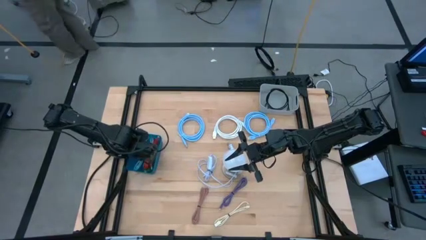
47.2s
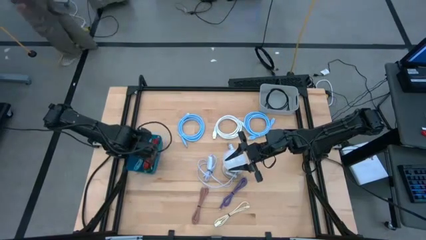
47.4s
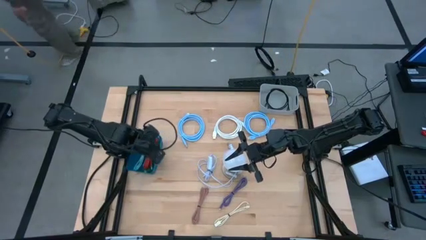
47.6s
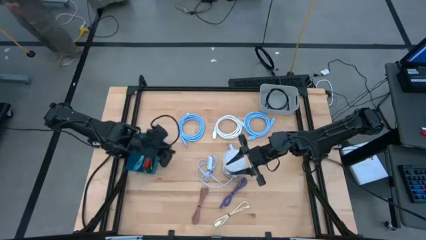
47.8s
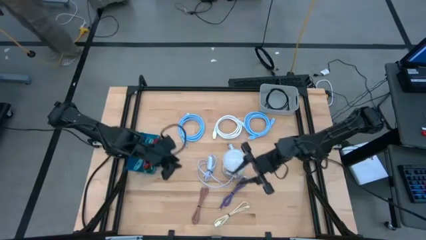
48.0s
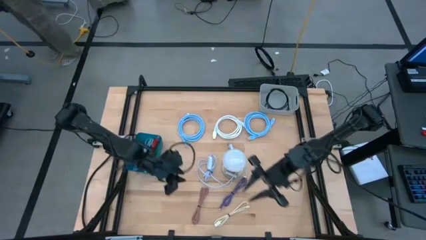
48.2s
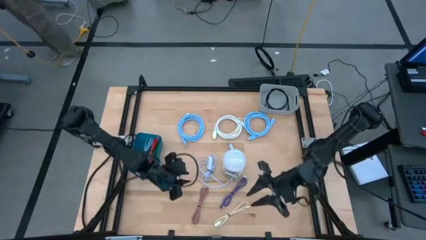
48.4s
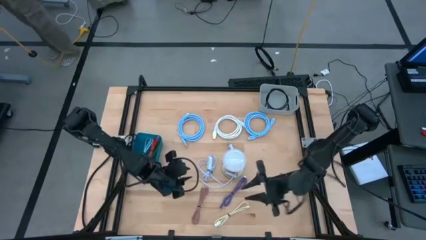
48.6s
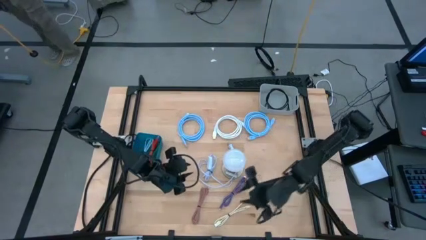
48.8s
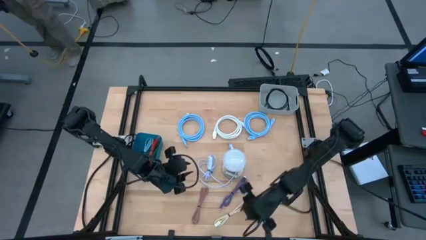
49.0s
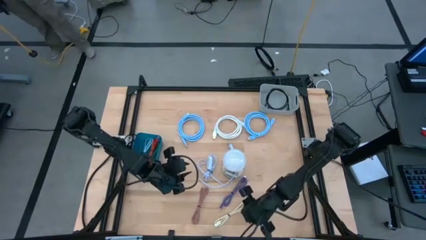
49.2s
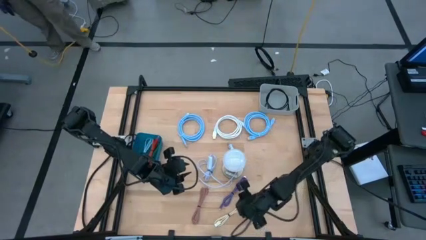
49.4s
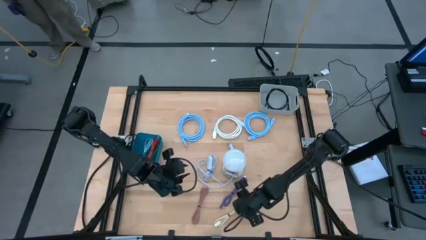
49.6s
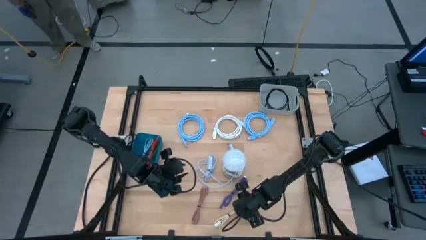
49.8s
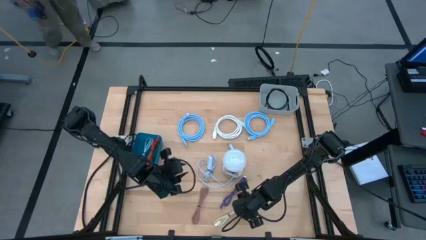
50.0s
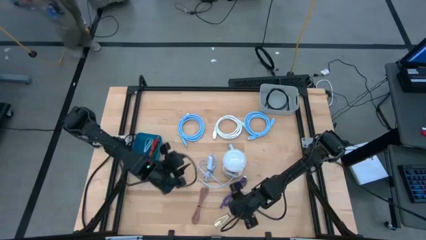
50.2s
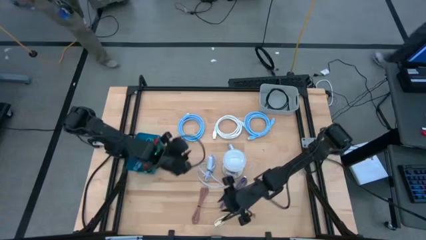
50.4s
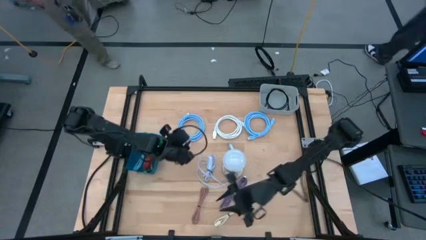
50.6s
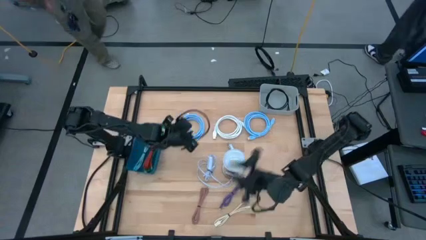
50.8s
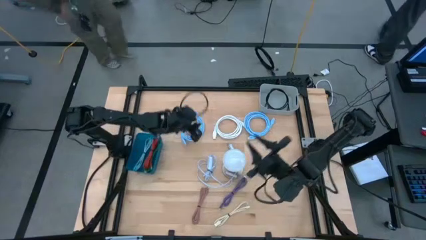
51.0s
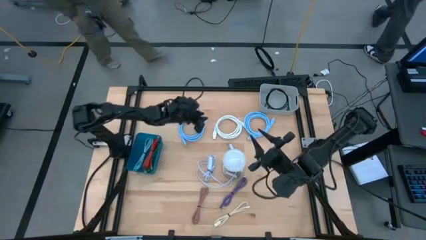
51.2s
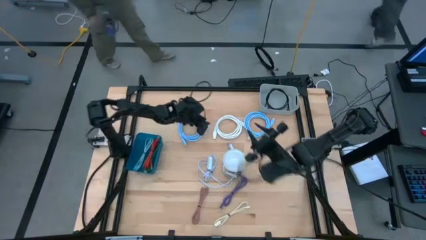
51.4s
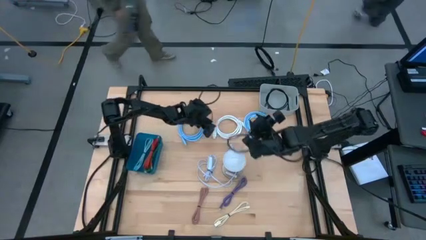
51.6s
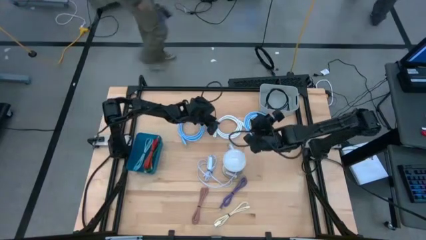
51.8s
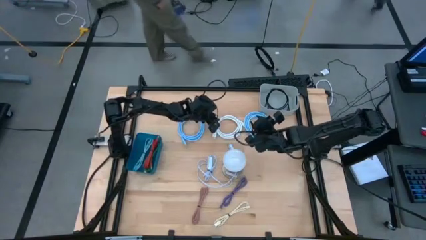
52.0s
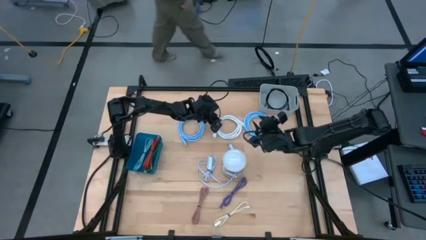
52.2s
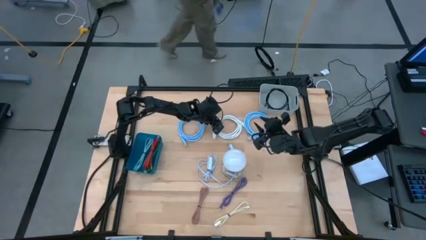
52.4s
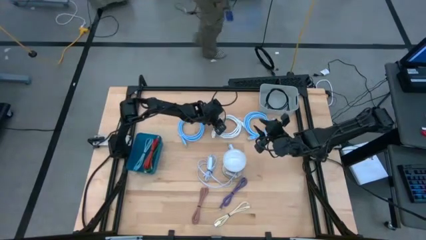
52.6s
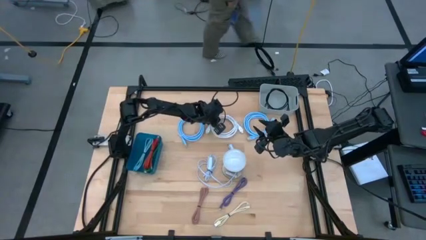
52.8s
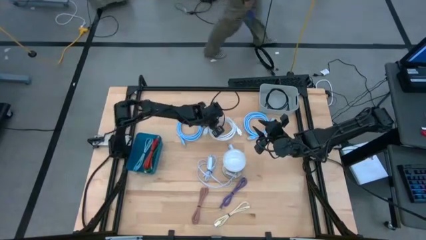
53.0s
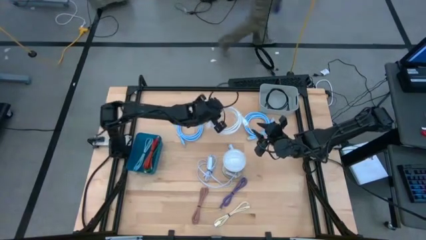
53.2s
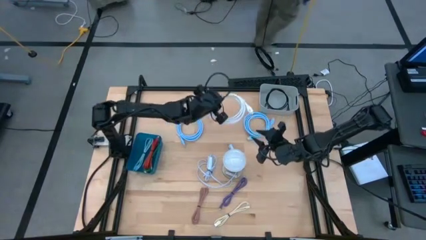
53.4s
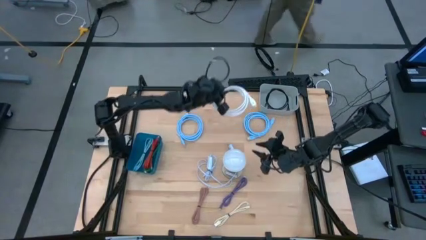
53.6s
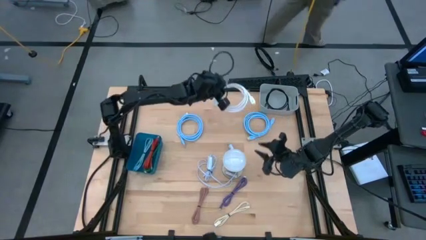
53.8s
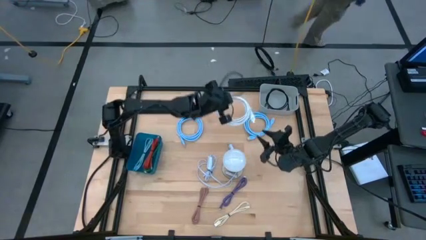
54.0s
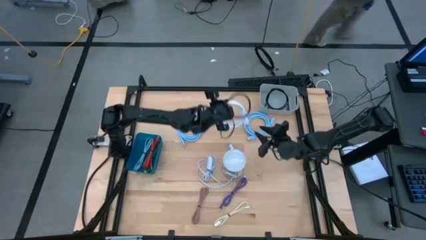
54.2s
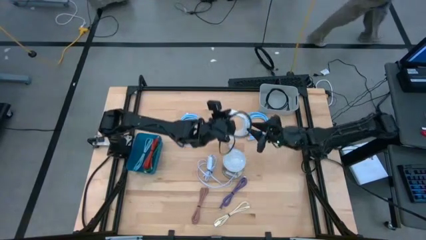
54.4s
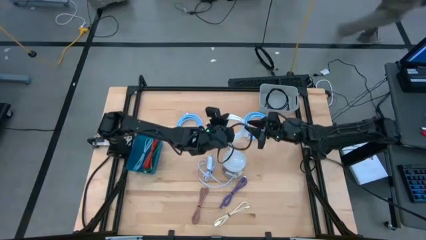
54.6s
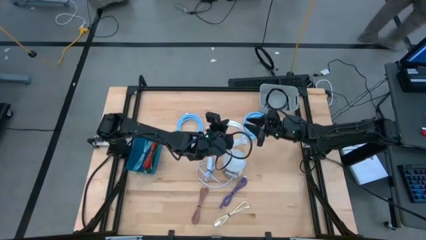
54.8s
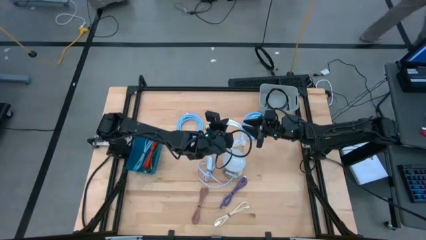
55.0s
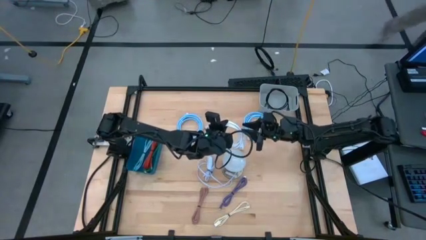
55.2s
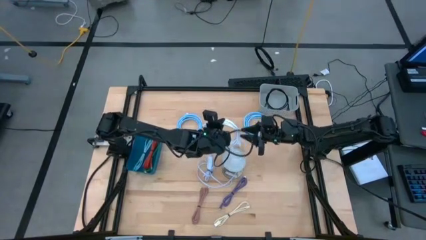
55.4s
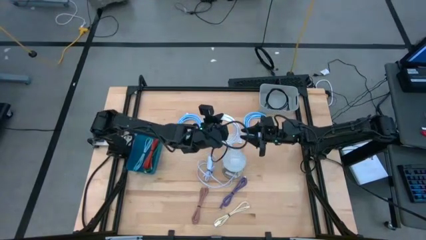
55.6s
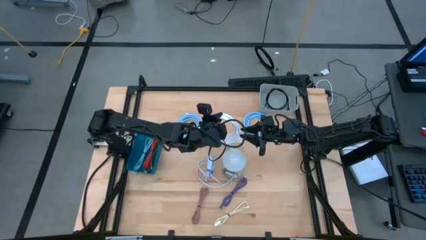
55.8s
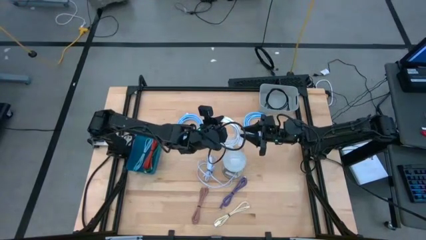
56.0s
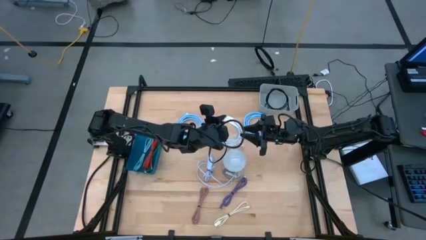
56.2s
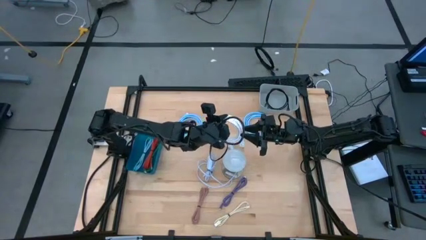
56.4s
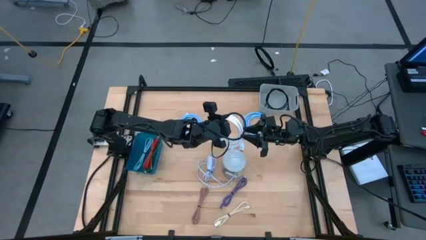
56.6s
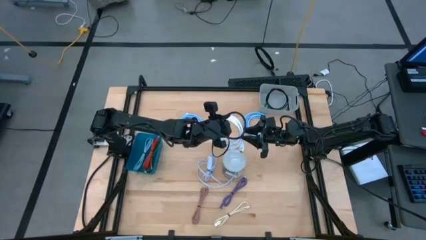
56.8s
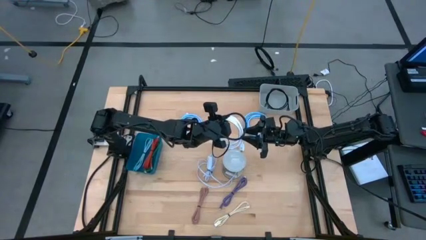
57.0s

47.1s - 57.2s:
Task: Pick & Place USB Port
Put the white HDMI cable into the gray bin

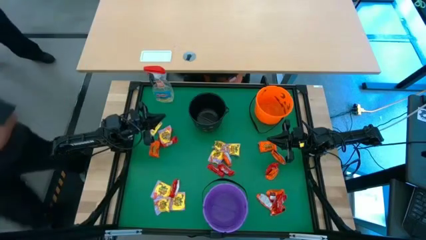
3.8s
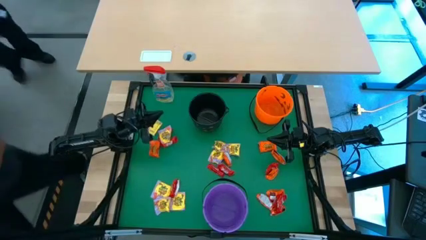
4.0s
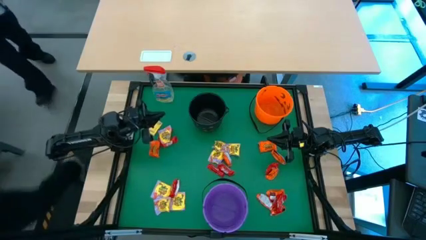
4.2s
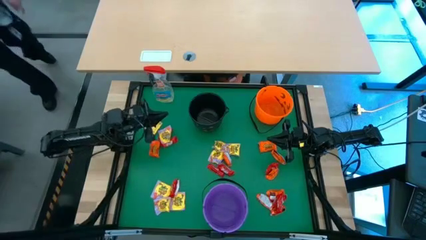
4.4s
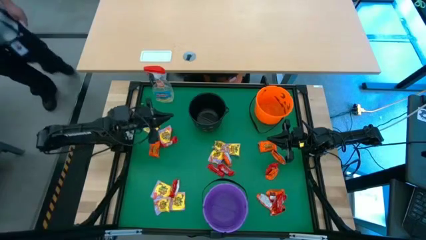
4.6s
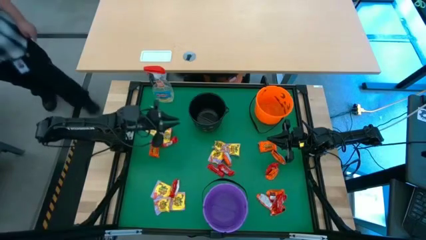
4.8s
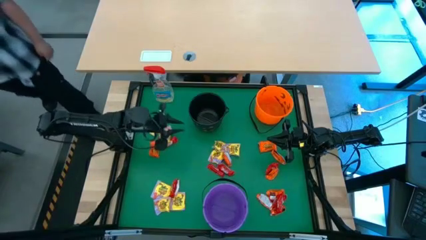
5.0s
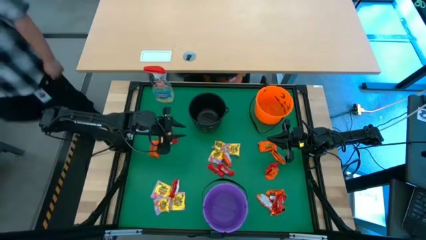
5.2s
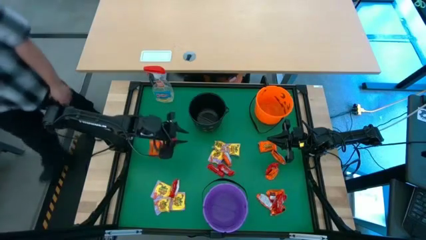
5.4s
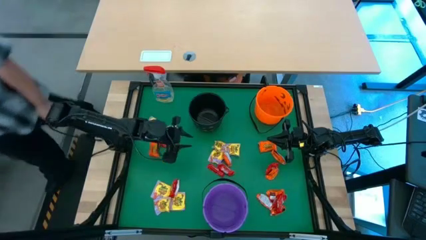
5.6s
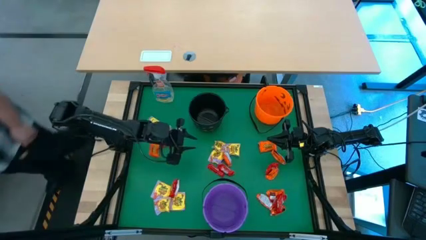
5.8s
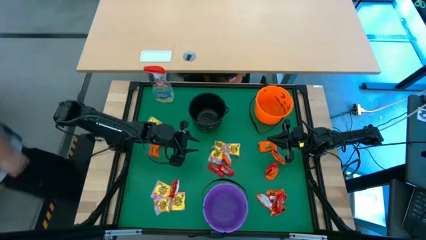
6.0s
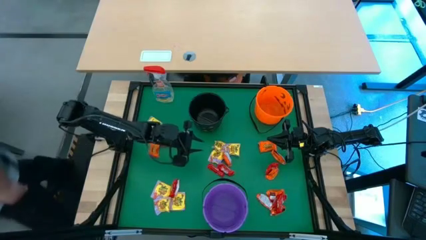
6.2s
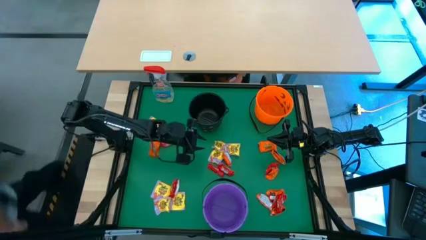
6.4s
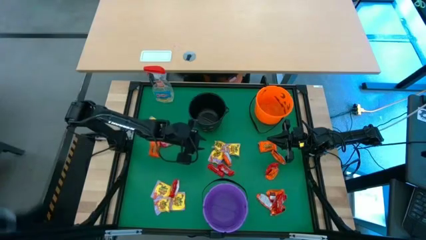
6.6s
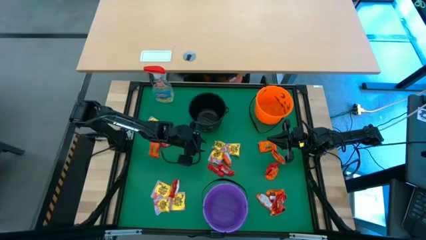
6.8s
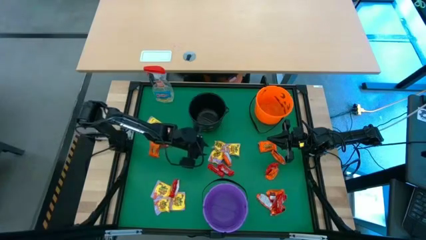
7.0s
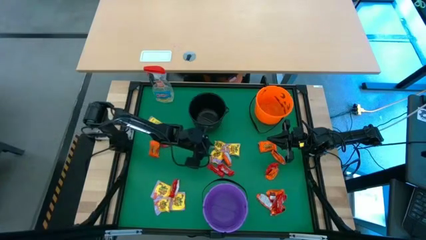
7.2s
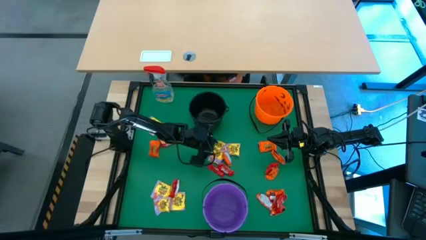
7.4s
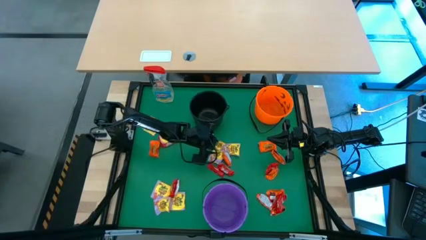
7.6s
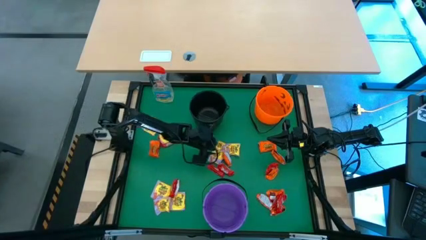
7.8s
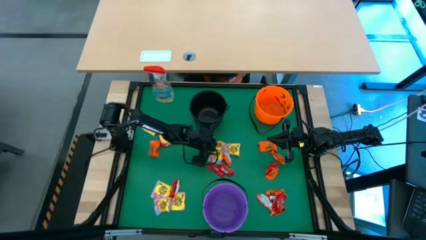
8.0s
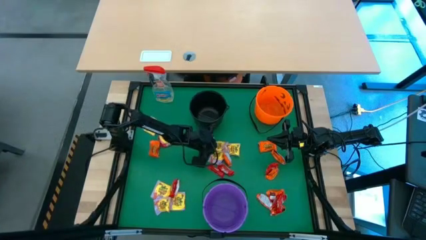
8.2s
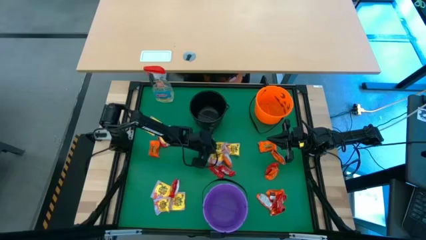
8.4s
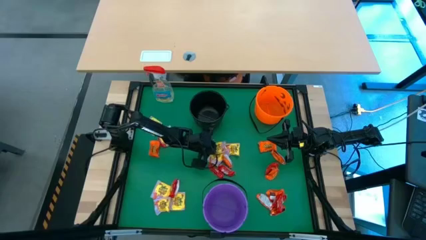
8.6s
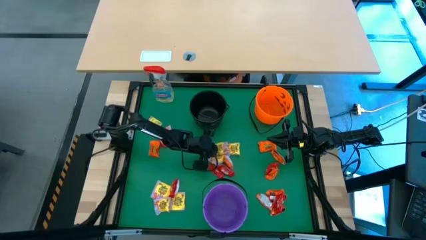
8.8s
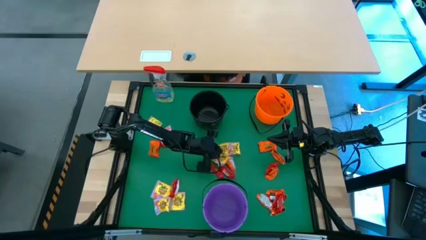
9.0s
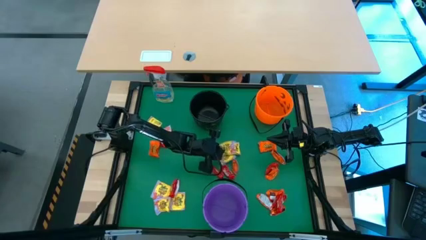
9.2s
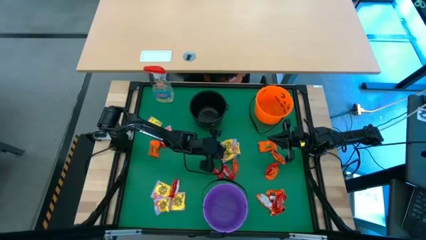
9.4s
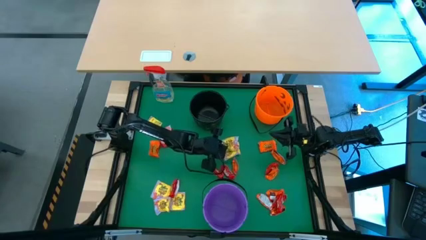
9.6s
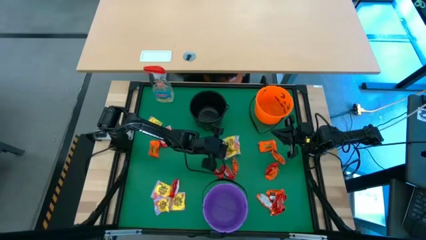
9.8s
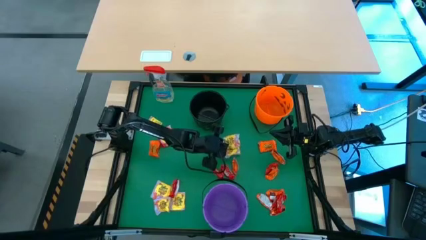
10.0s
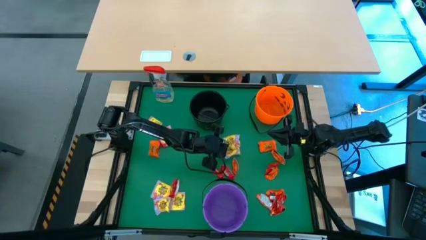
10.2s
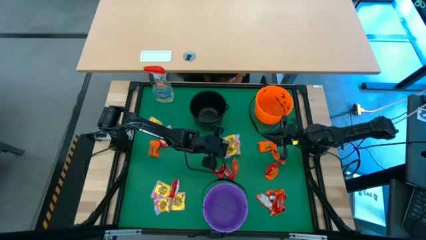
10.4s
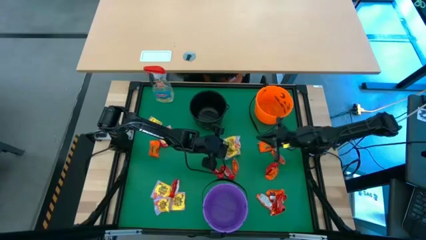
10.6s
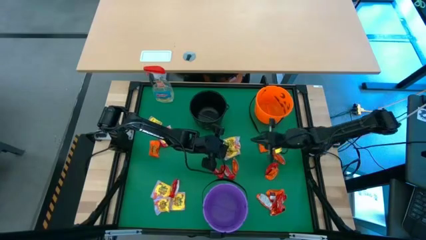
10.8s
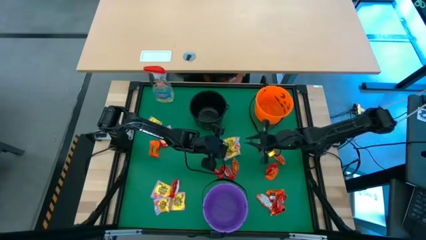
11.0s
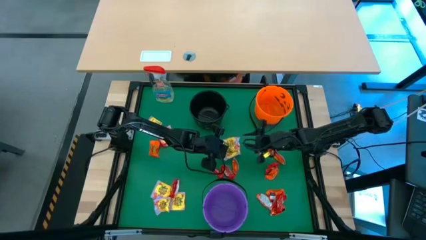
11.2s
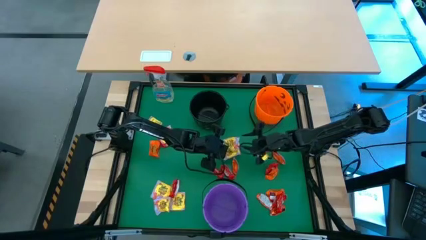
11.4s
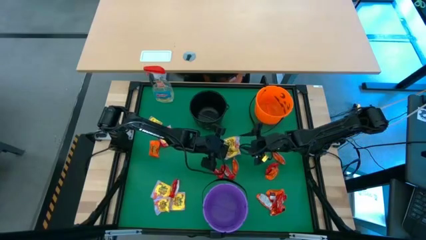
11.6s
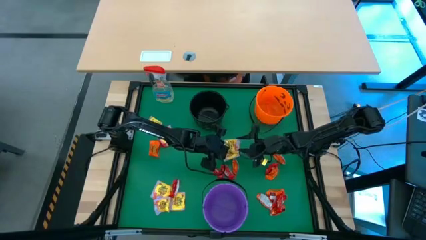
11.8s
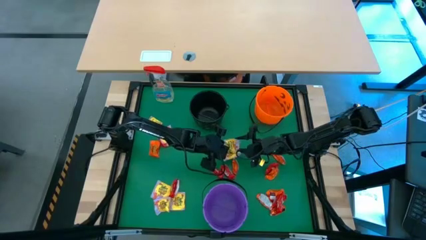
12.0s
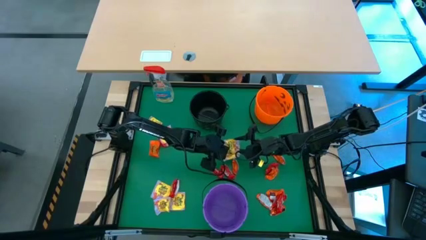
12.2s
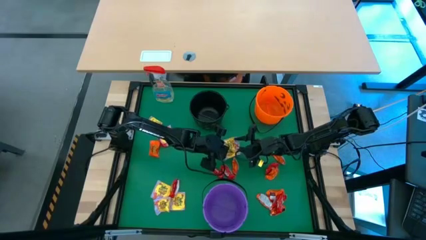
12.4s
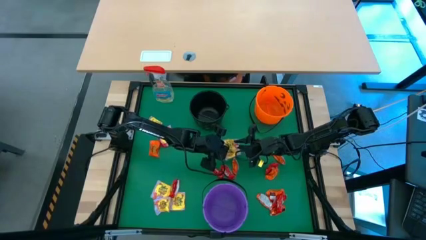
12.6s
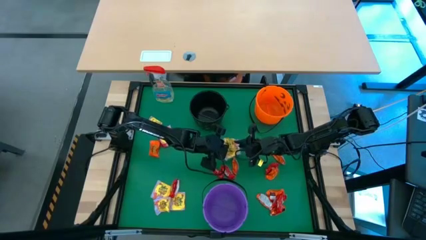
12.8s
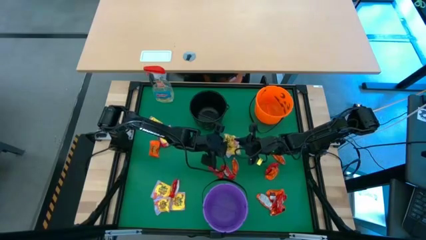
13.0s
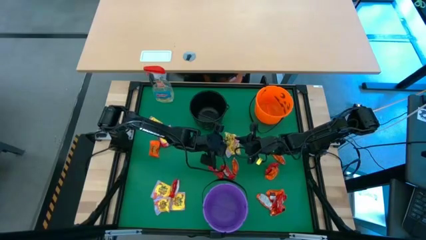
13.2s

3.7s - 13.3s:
Task: Sort candy
Put the yellow candy into the violet bucket
